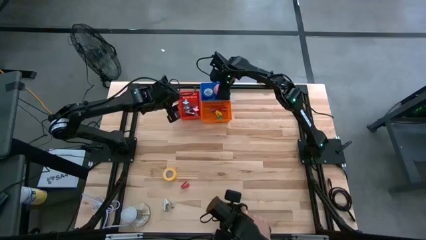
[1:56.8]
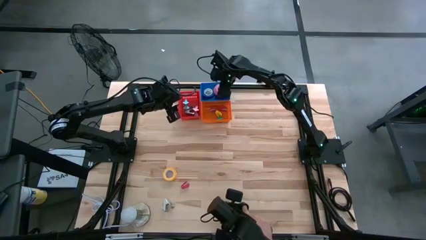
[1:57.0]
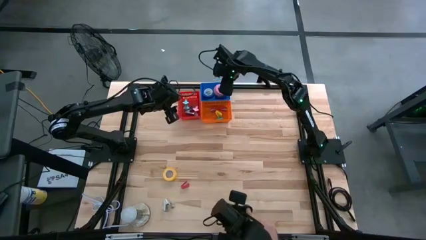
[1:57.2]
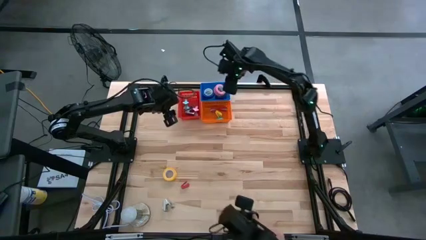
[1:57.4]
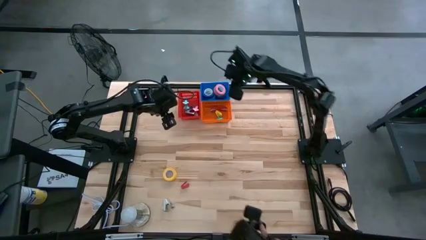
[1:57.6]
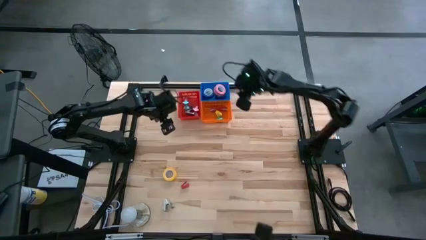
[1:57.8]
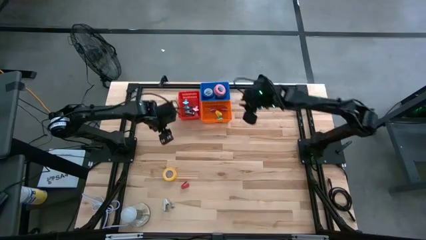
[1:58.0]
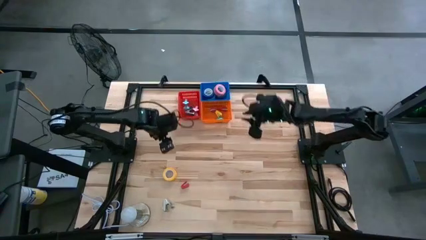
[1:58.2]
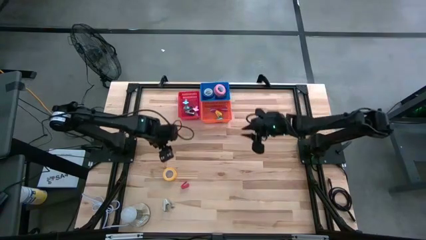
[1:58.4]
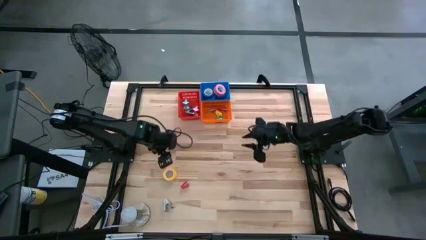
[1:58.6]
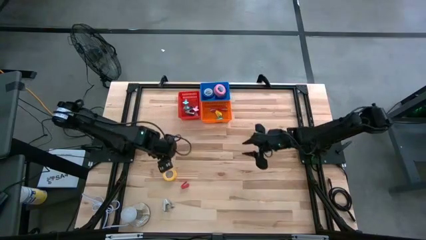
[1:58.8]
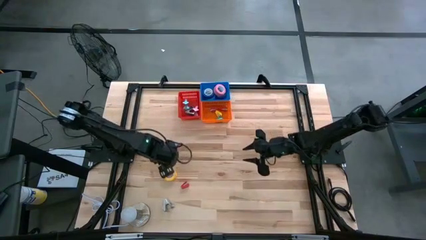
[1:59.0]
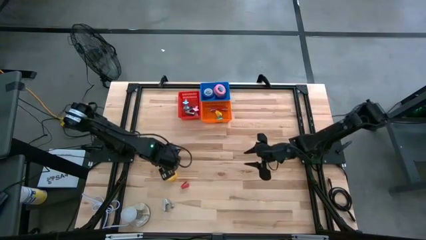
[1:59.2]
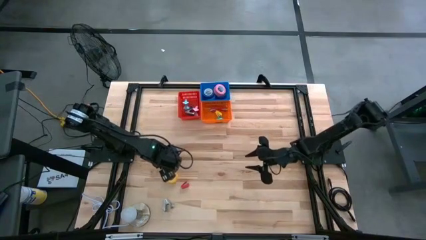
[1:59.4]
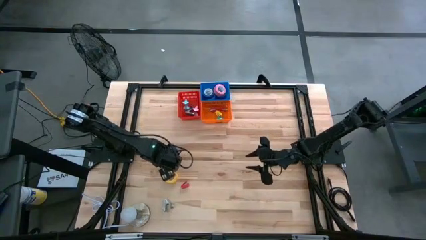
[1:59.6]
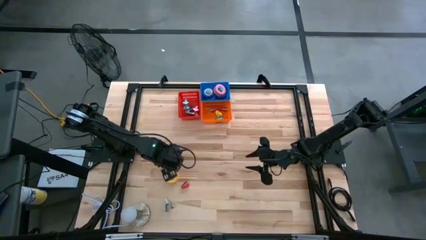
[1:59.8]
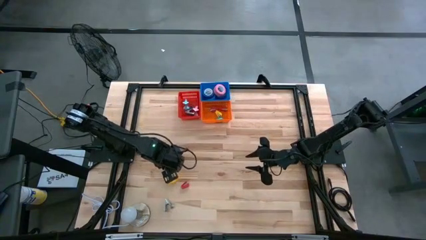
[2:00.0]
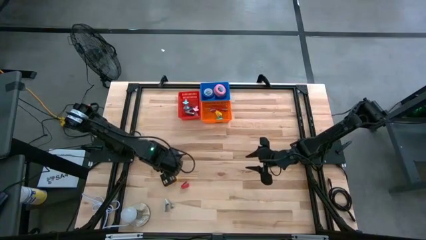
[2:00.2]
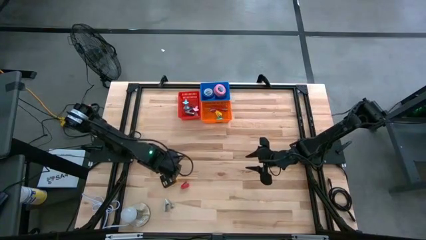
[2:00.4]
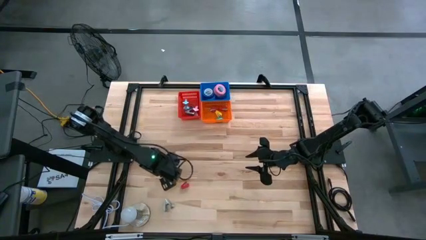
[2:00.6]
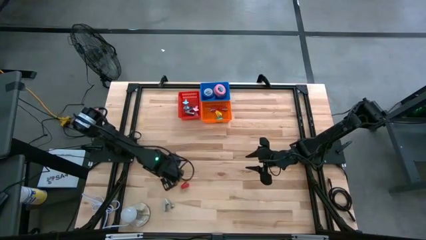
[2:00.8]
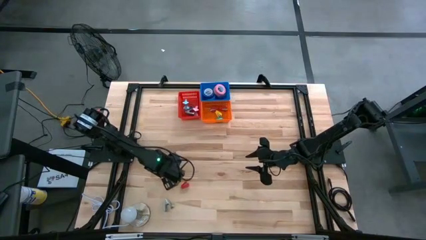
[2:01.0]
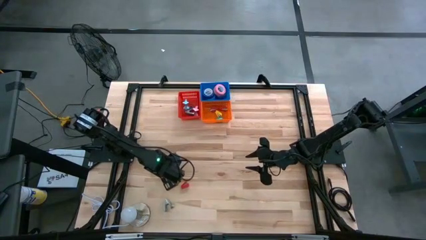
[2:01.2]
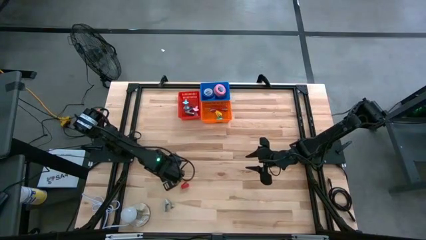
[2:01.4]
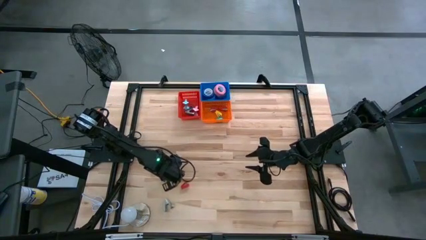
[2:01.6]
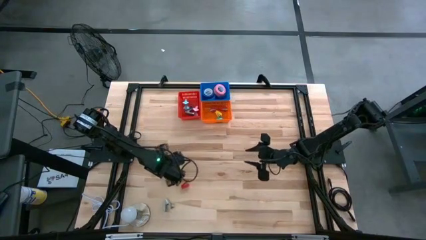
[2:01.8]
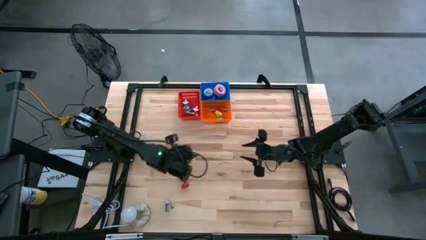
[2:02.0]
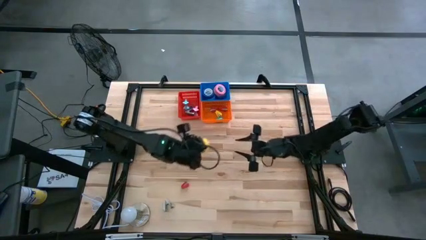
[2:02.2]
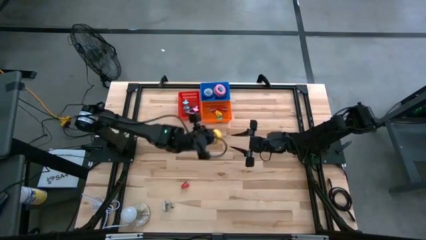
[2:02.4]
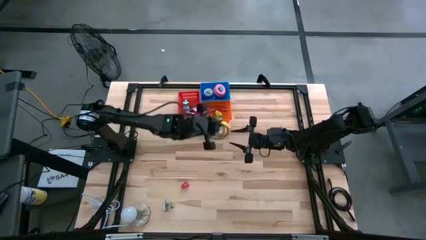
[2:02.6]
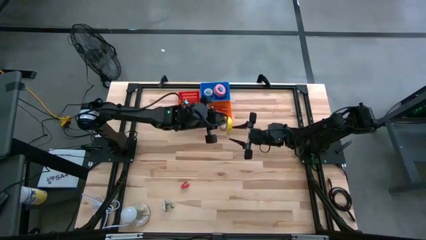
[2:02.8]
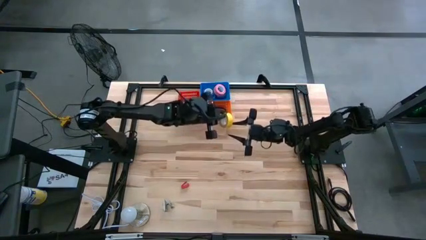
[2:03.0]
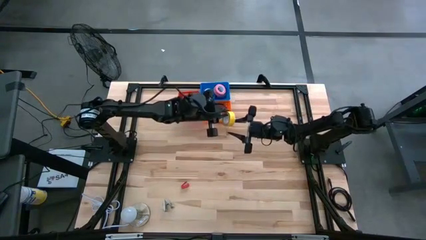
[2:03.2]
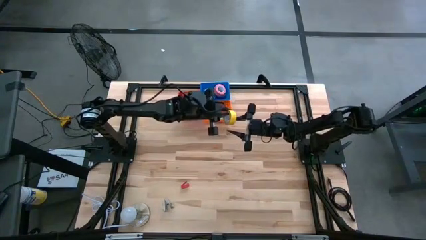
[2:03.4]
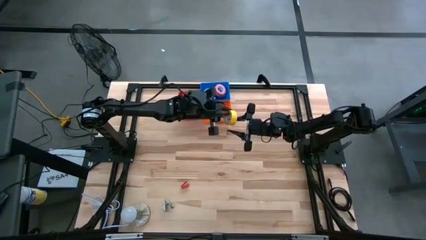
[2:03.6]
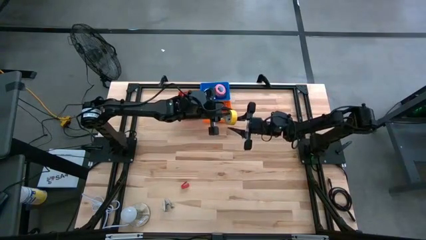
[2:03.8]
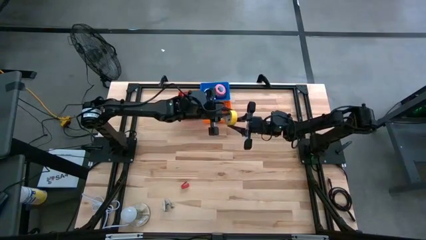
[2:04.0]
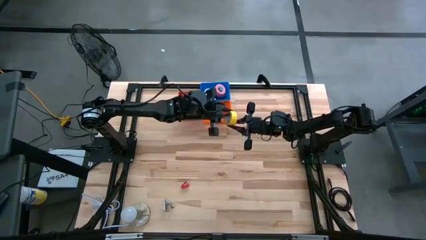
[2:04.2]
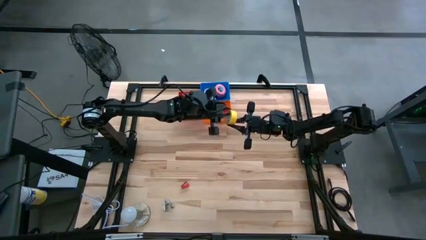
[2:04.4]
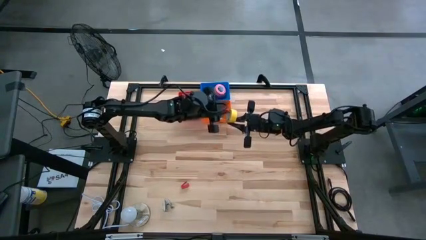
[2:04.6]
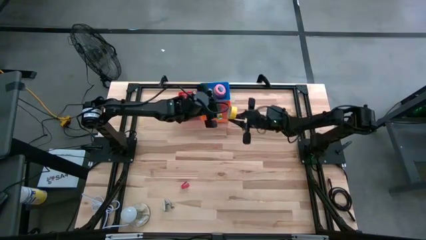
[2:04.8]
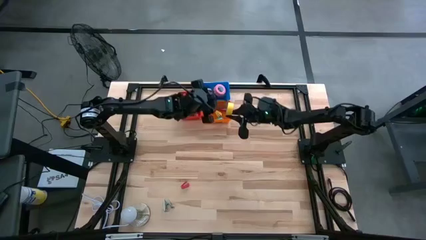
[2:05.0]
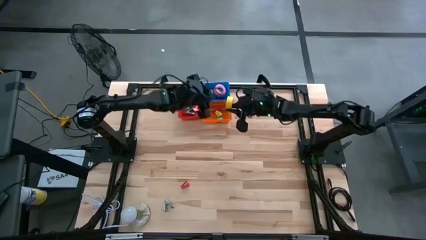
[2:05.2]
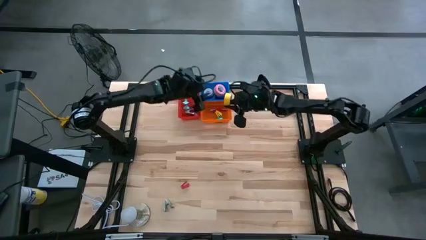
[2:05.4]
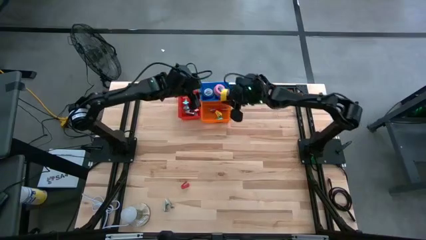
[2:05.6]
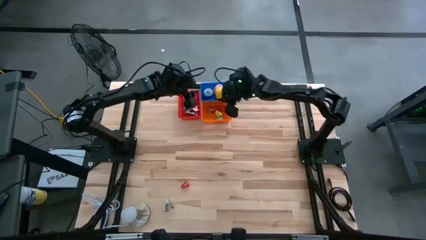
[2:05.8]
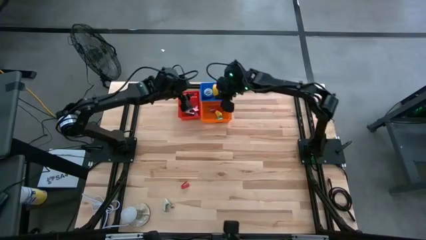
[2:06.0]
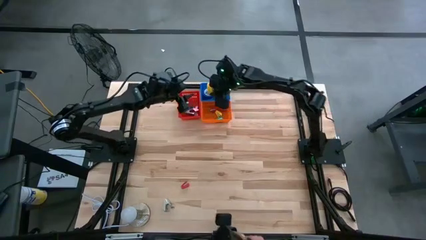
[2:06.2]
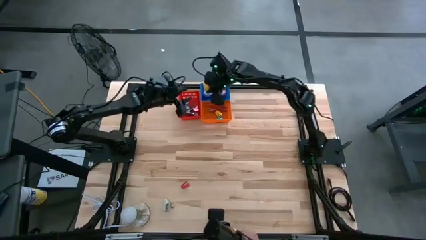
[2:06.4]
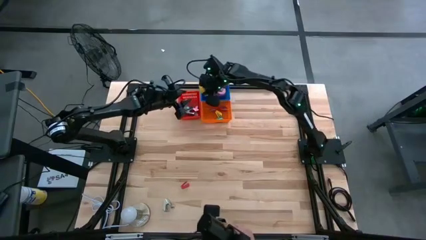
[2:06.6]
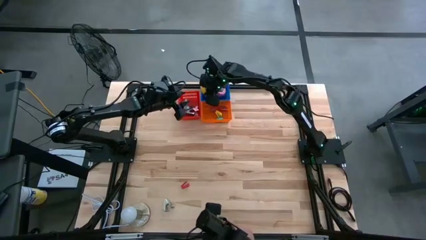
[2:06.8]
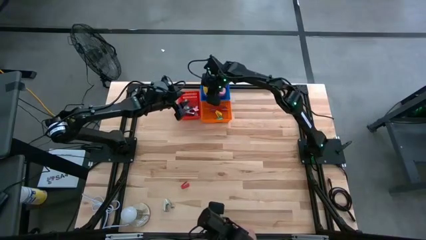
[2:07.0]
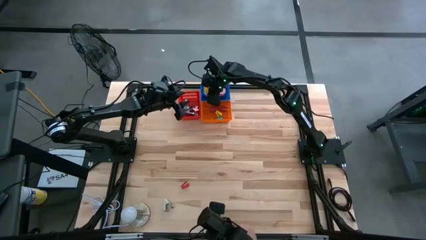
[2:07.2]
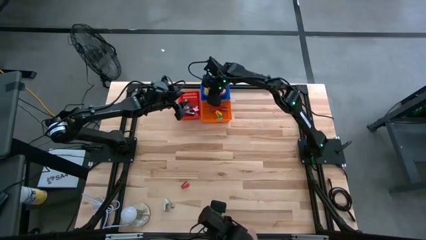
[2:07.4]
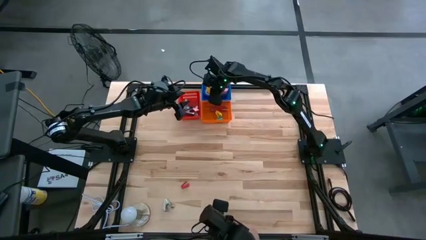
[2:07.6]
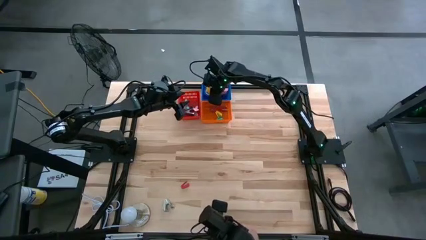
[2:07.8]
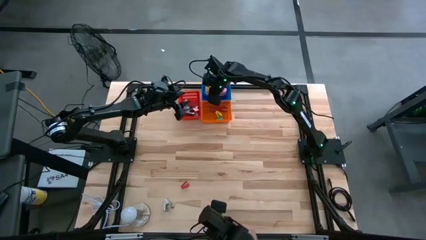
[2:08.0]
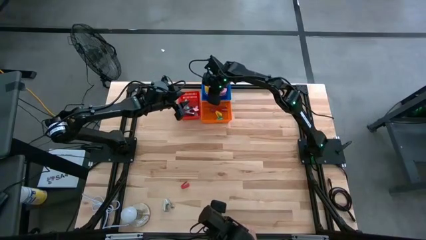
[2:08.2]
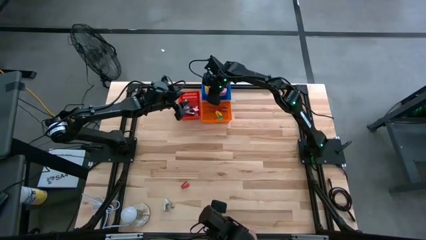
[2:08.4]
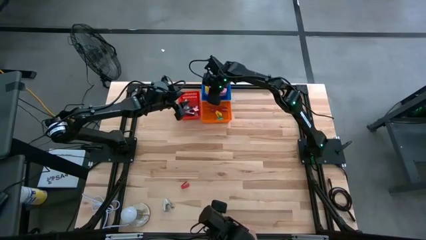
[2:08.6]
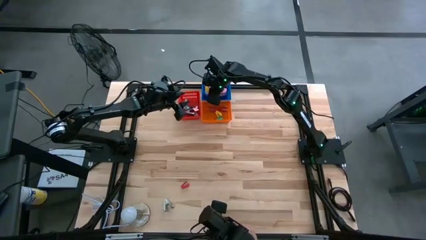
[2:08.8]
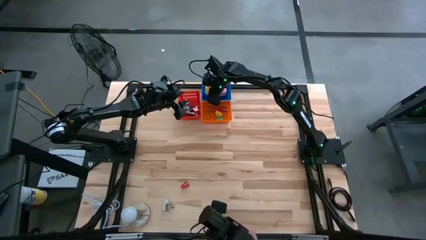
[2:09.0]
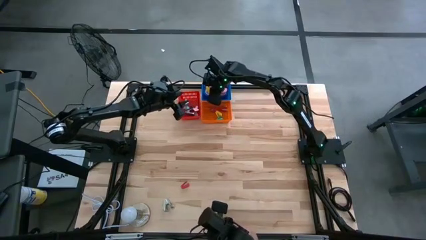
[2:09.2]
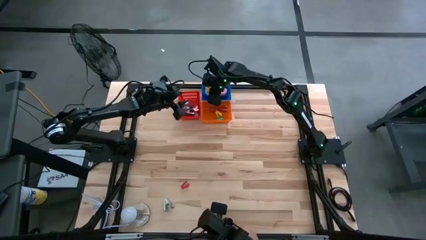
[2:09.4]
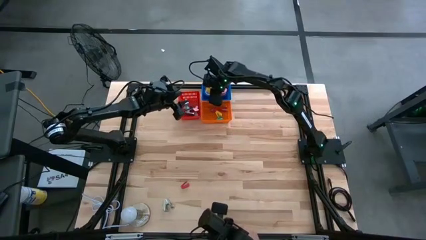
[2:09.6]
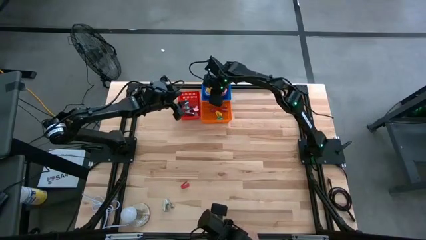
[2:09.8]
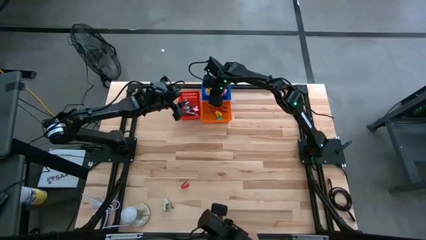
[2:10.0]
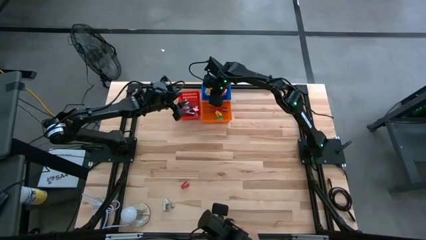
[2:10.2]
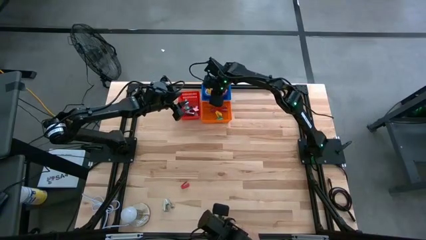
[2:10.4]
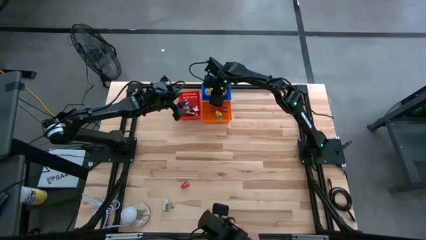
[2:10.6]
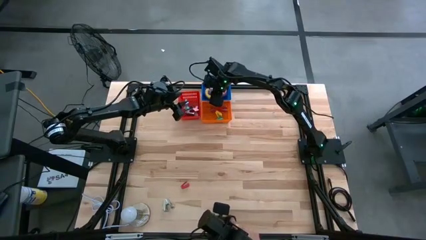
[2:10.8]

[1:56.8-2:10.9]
Task: Pick and place Stapler, Stapler remover, tape
Put the yellow tape into the blue bin
